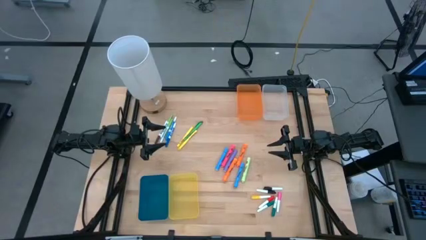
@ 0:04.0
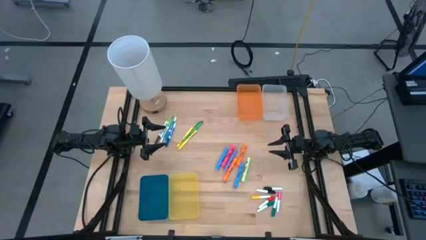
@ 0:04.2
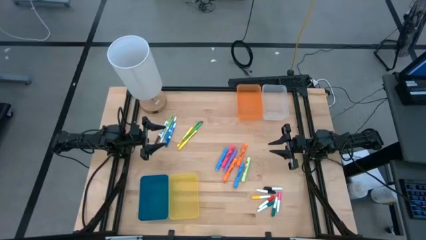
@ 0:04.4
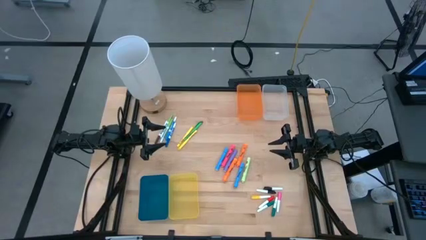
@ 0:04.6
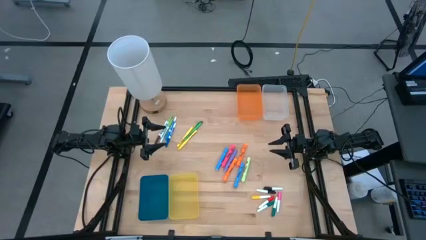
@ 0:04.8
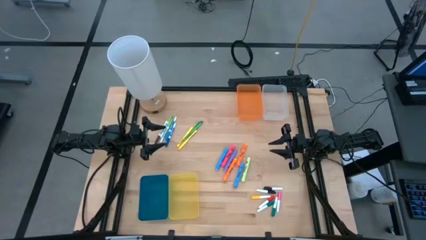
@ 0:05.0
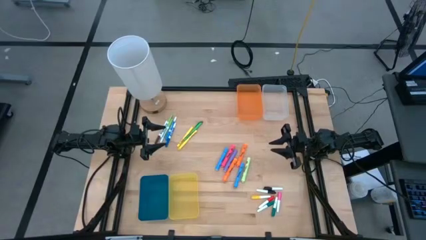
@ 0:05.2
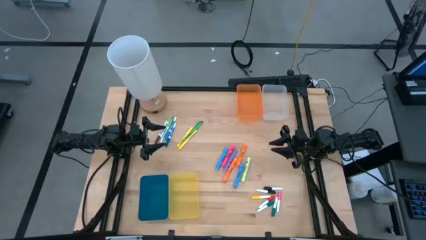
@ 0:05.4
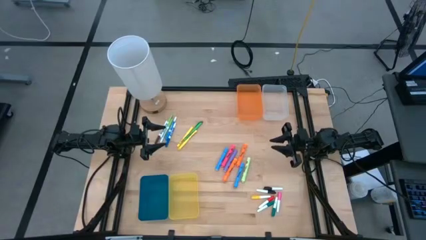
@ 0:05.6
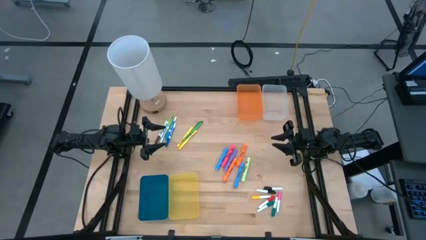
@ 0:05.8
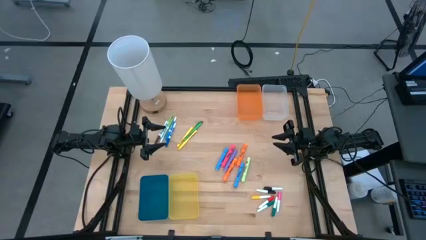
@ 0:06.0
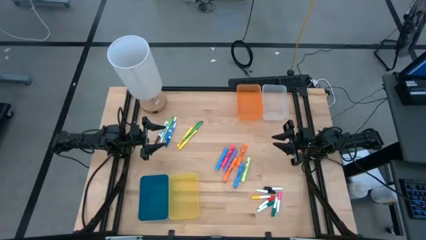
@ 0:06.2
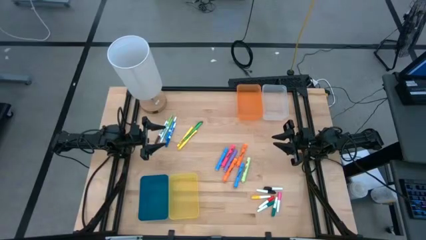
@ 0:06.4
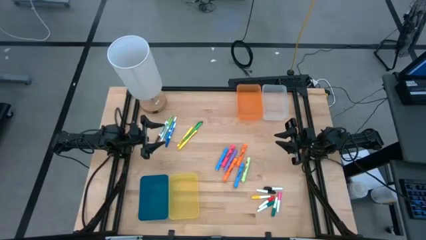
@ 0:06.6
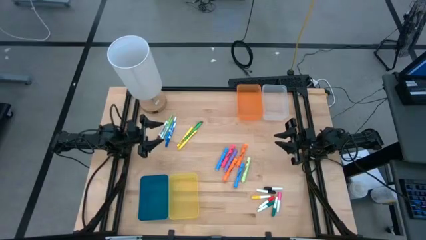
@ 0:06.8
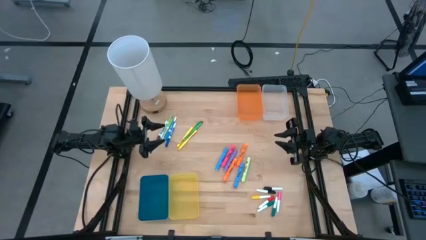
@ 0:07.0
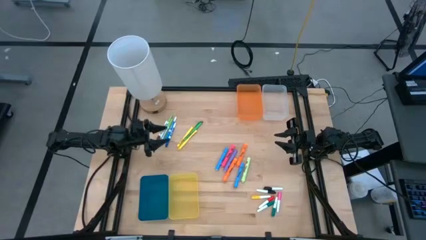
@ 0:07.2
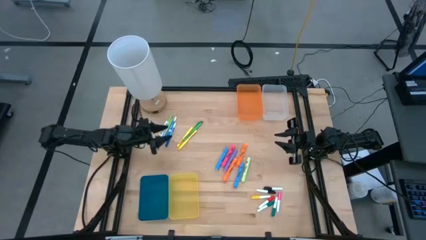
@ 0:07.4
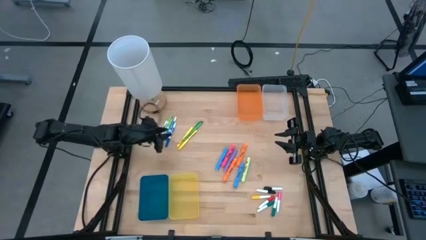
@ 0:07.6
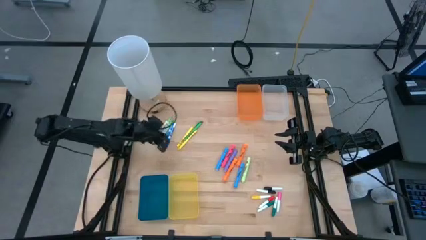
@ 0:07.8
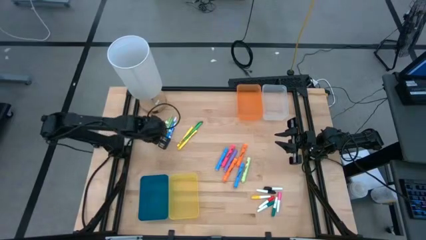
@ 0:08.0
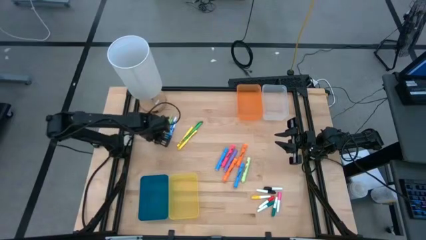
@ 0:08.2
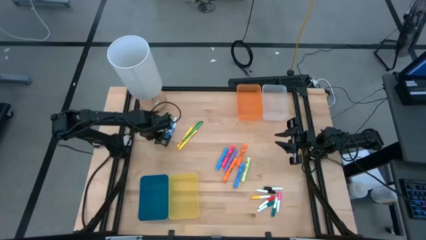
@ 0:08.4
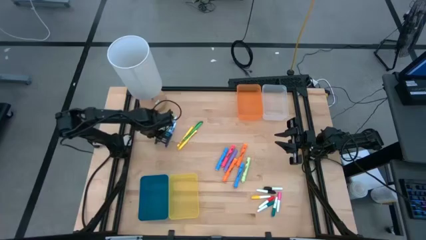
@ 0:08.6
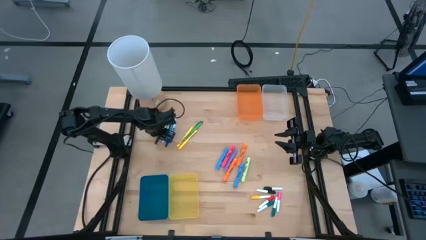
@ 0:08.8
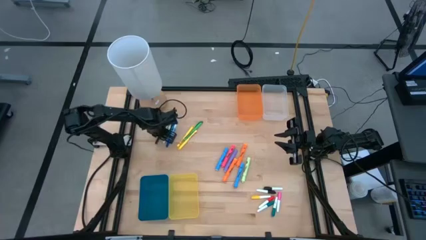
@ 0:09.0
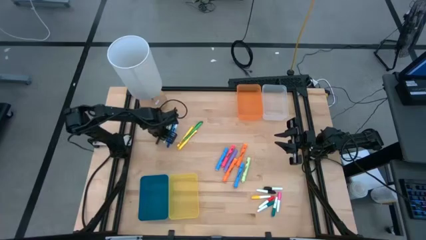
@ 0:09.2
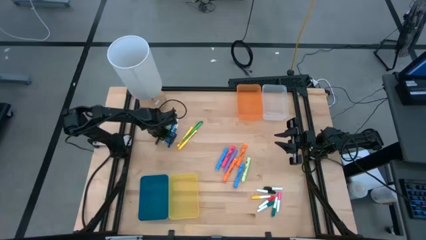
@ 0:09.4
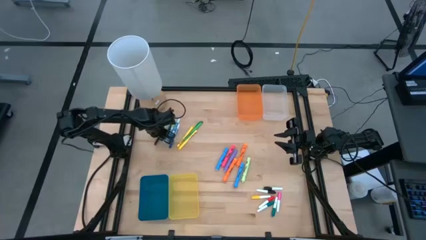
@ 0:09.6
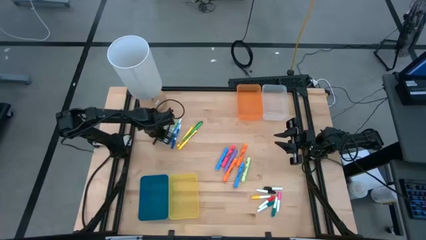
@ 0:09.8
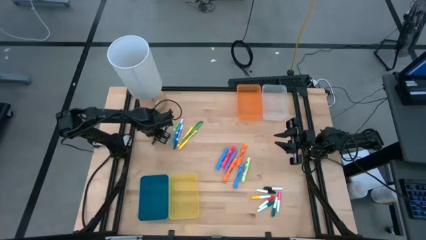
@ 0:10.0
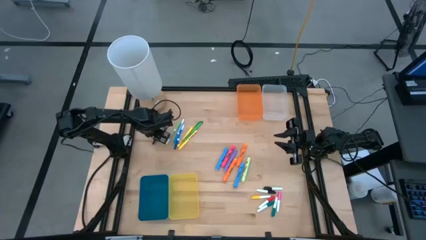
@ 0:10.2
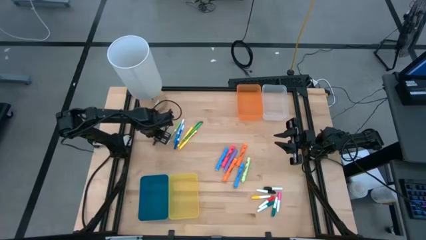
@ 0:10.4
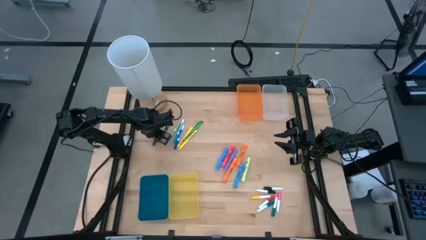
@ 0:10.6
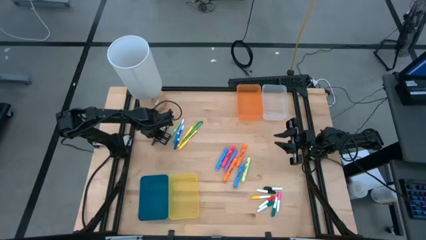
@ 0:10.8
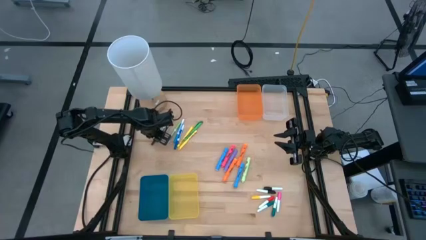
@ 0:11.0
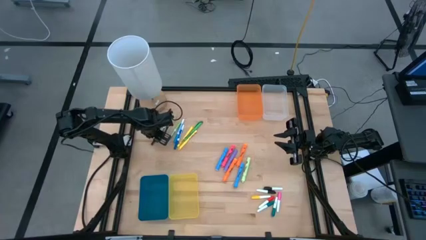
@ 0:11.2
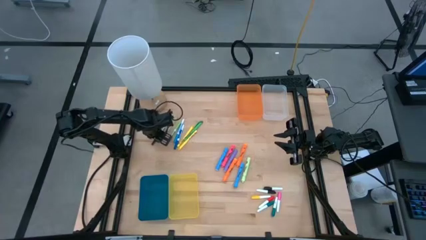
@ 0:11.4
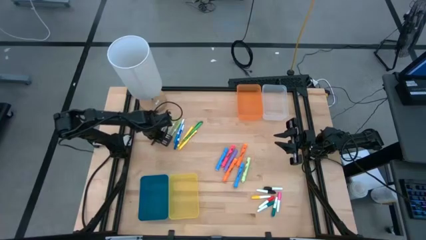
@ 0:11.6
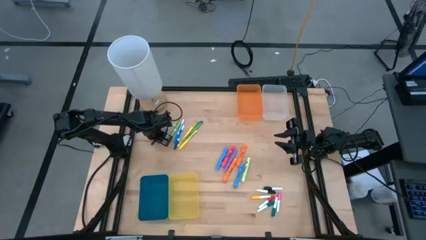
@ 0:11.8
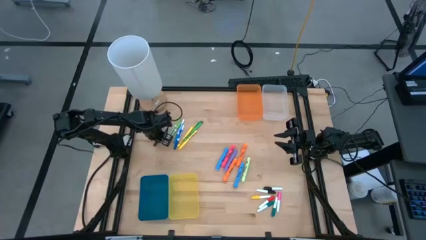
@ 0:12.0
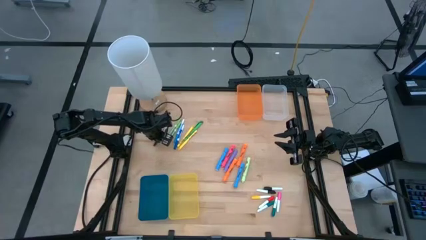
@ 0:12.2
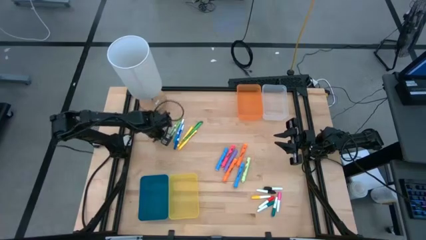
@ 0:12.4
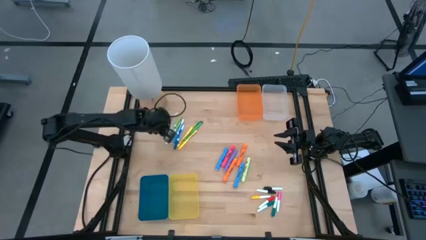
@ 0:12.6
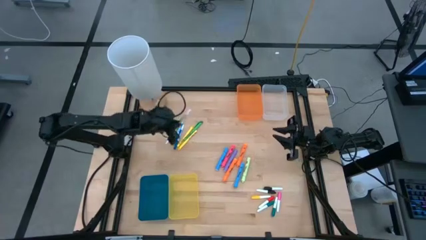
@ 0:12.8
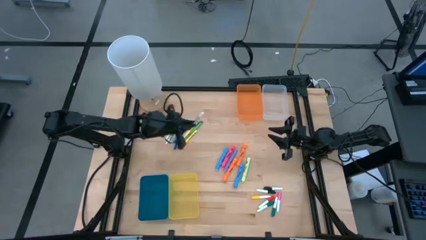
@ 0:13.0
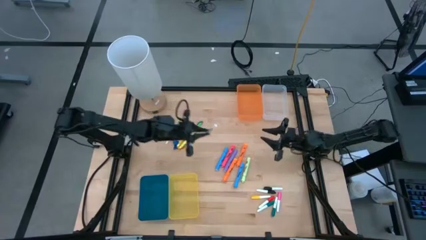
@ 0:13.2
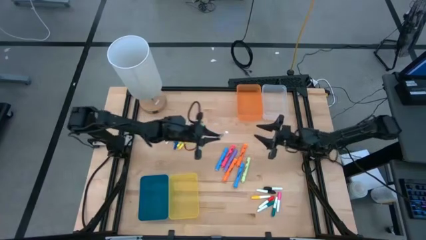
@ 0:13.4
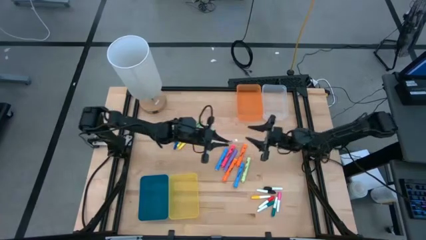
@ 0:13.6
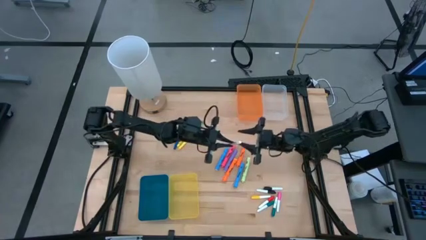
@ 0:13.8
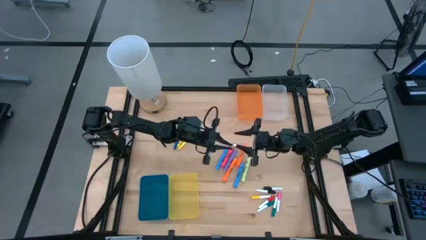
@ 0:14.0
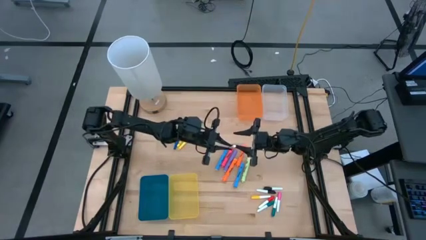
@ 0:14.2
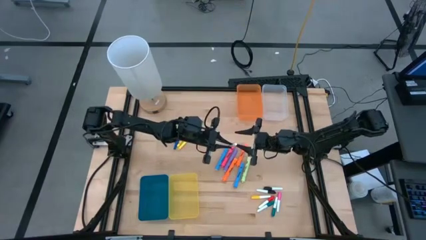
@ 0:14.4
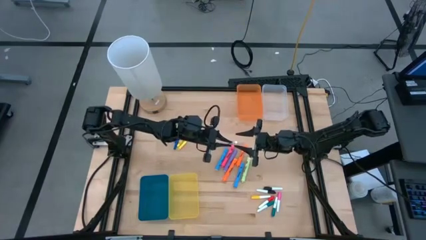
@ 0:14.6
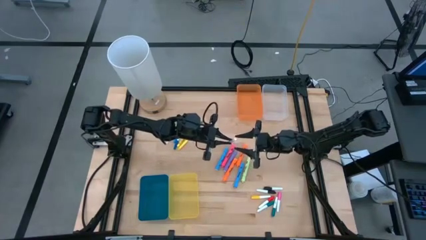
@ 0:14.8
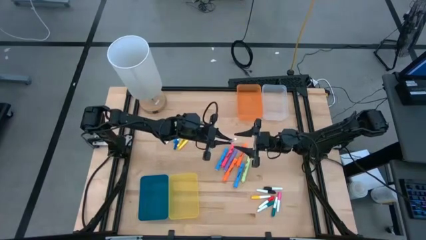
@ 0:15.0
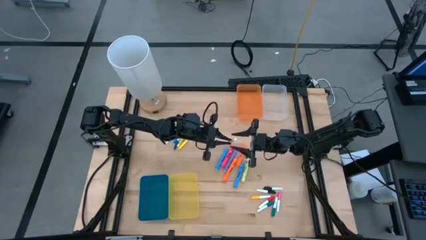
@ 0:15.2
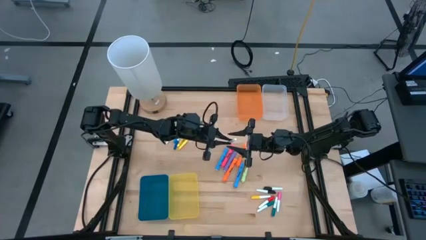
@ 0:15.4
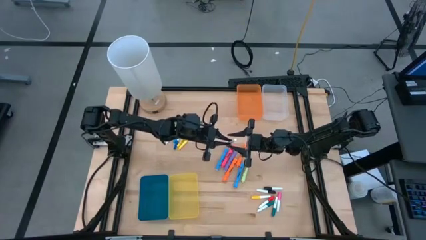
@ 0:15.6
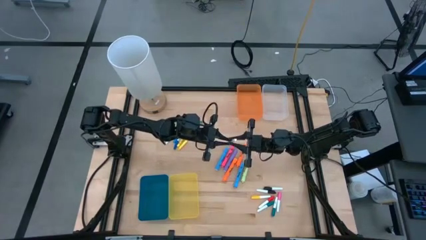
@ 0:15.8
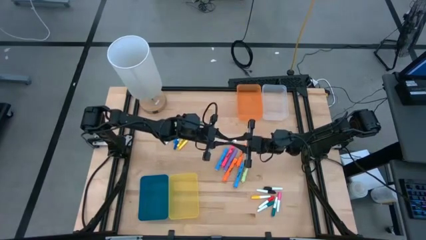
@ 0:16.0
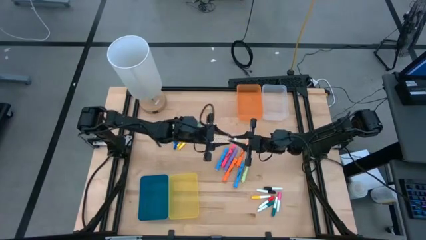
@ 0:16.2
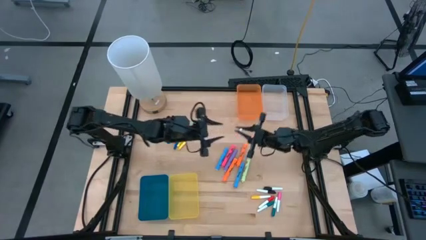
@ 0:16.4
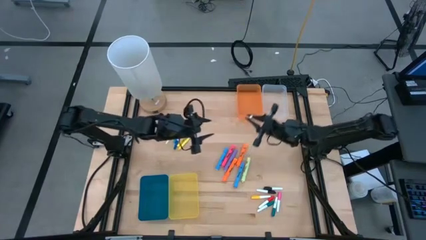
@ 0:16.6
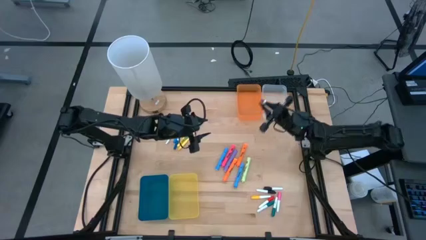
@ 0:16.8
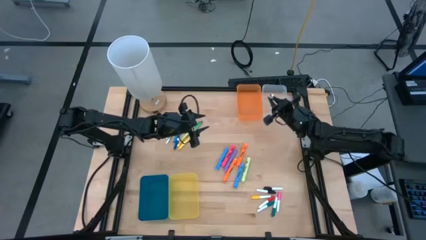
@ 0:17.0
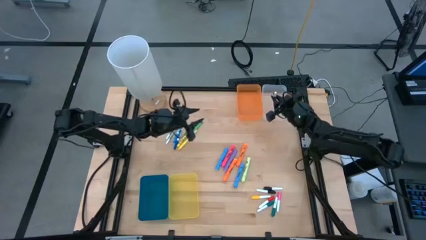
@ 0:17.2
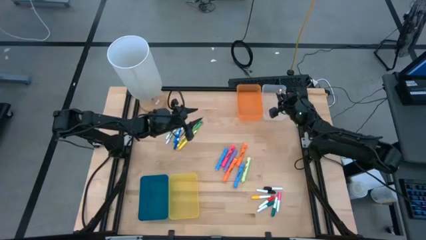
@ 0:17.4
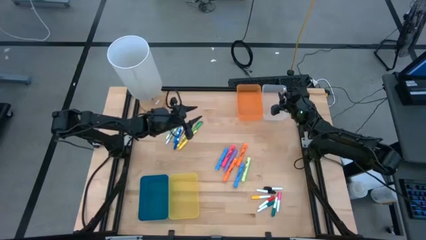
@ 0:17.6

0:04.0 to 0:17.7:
Task: Pick & Place Markers
Put the brown marker pen into the transparent bin
